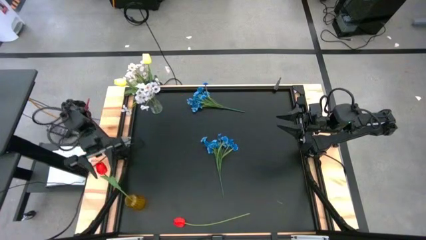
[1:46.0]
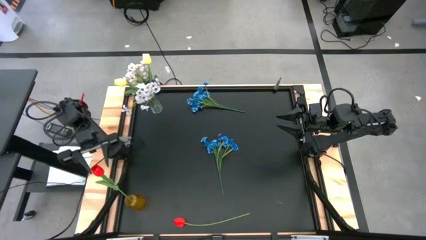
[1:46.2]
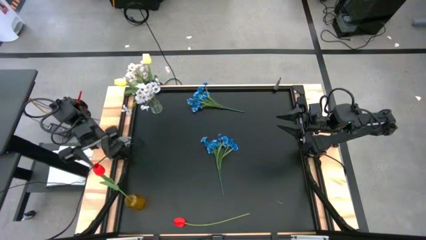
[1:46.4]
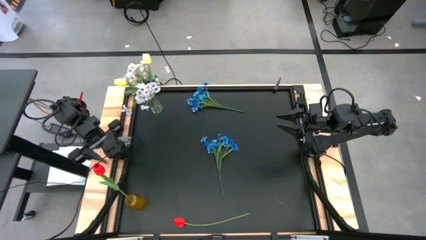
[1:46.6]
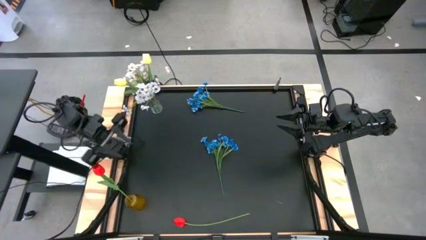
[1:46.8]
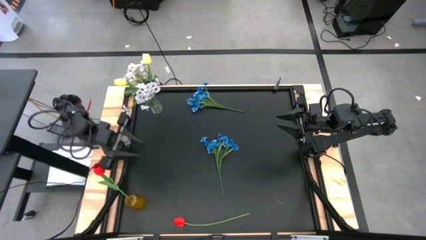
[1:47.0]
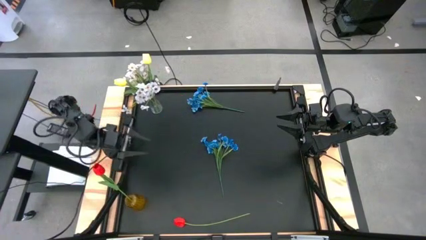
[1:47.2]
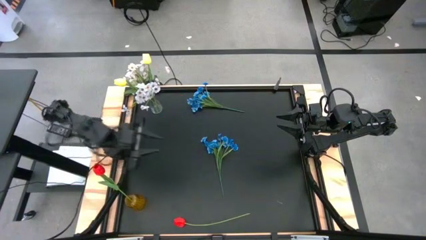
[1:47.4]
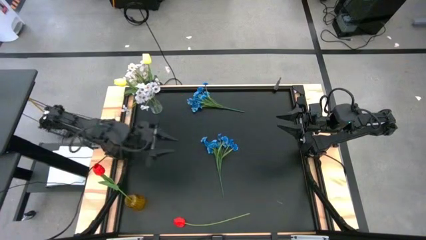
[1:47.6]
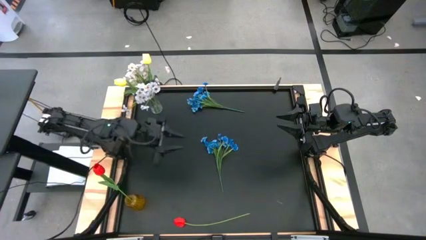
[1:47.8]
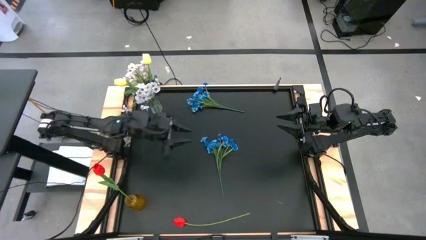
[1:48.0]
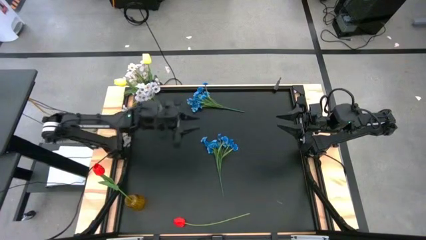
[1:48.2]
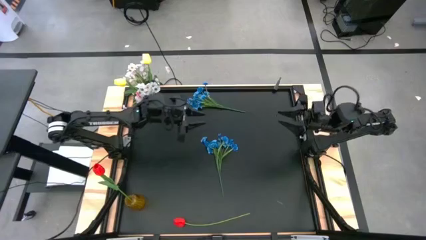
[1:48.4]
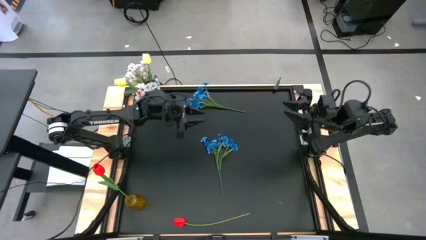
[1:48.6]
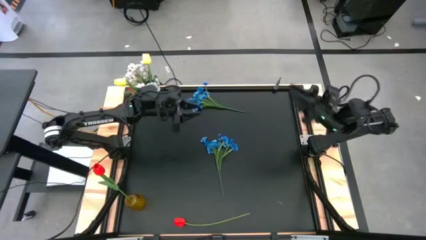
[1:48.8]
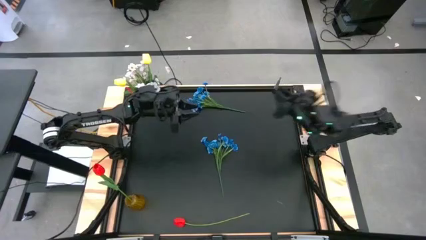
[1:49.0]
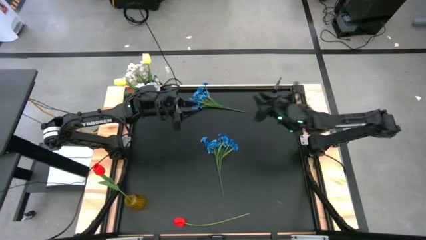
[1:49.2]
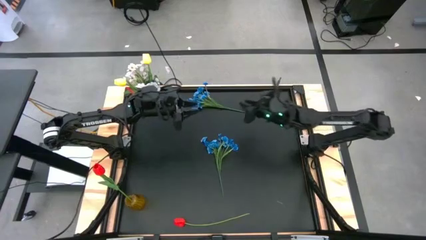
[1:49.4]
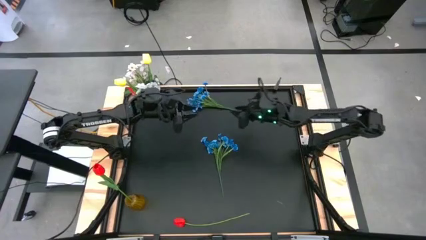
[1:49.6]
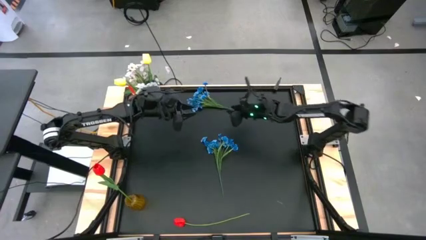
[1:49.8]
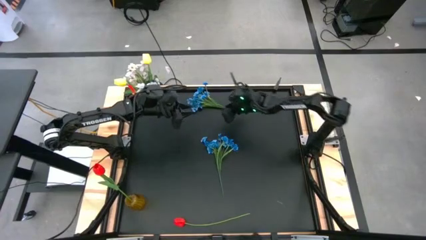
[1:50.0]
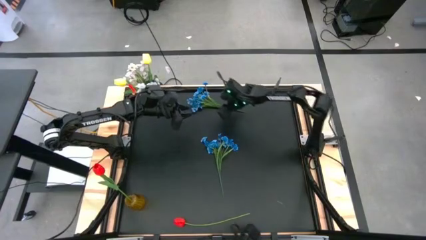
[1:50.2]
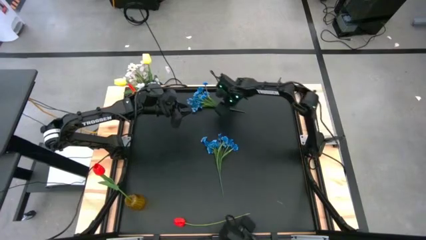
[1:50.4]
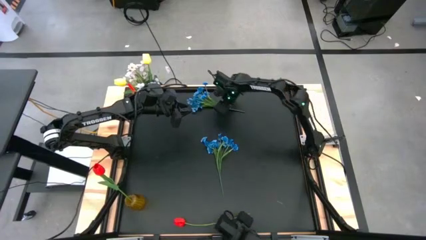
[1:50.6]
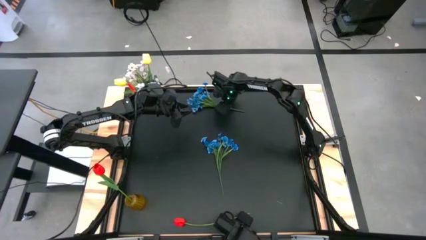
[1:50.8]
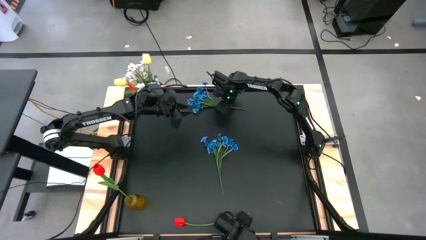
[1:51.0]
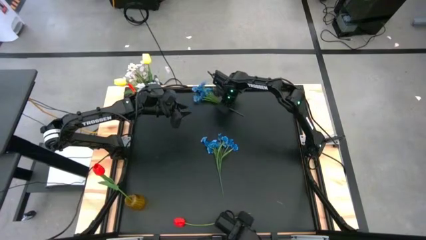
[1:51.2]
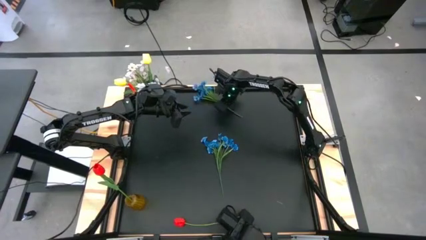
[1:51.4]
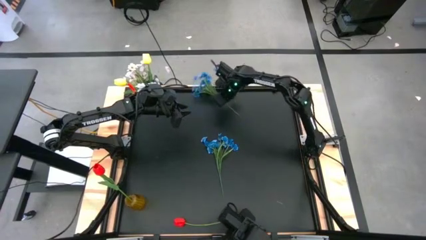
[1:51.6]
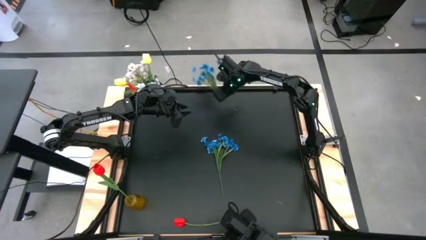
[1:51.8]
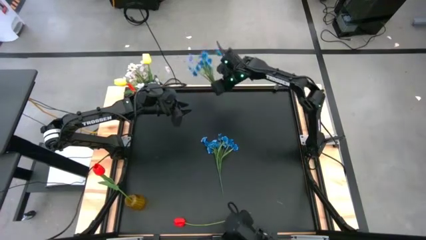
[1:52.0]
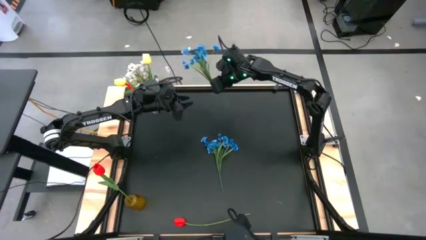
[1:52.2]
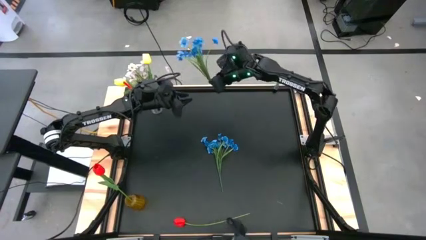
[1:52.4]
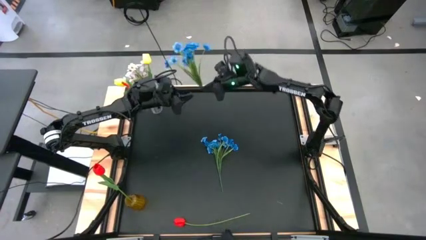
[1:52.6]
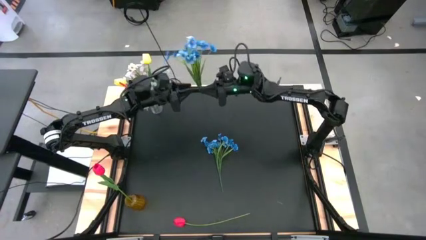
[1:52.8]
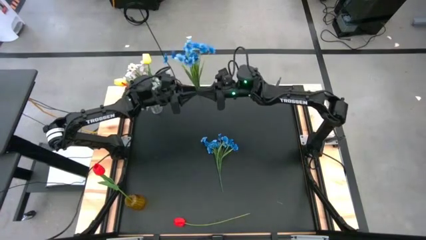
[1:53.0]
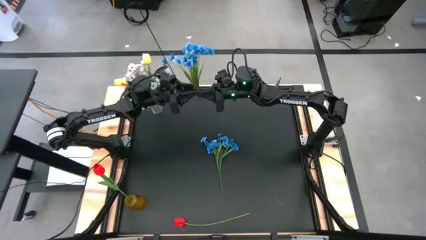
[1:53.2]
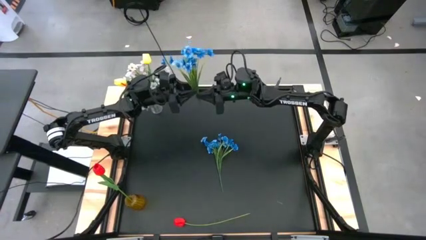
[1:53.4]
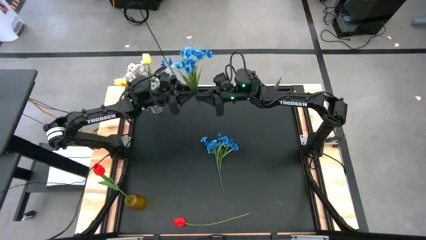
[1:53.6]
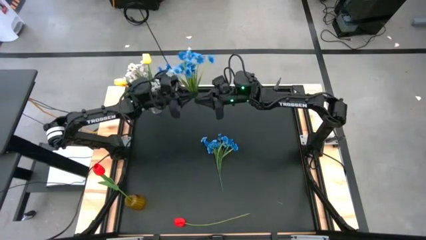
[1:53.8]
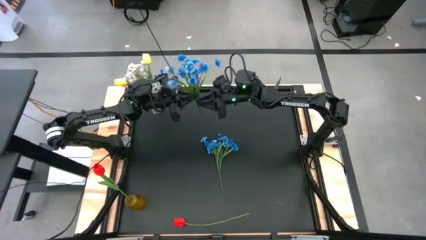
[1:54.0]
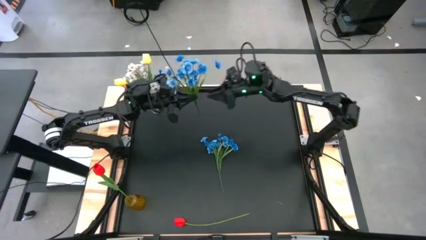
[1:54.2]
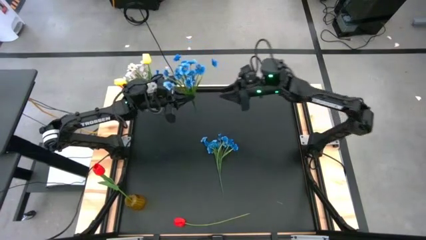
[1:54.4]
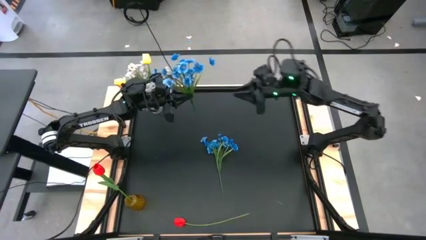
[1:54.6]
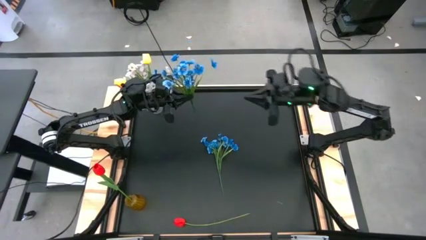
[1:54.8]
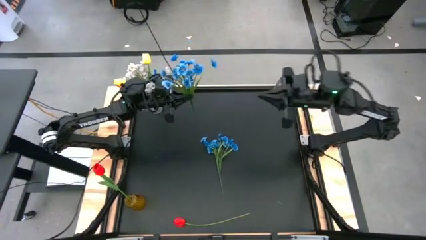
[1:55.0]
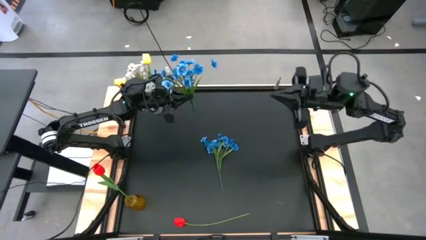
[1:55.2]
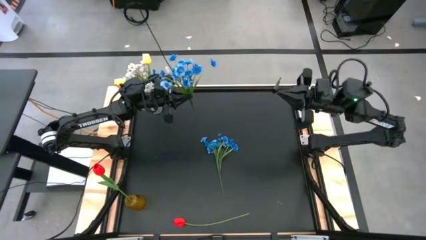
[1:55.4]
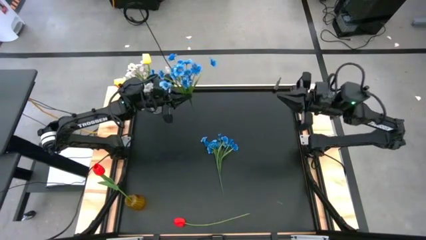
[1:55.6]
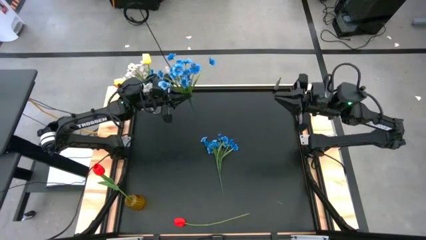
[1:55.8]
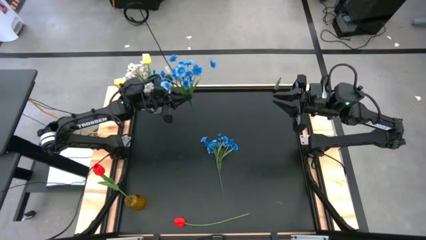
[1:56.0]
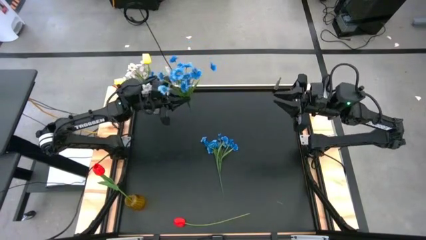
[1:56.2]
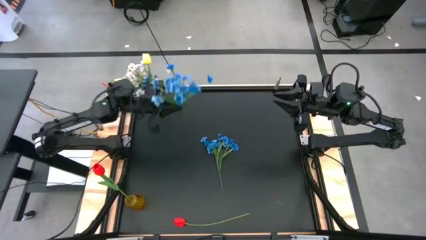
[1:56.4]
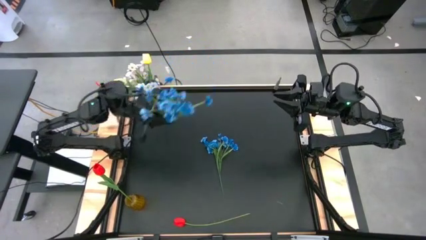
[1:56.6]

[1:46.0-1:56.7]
Task: Sort flowers into vase by color
Put the top blue flowers into the yellow vase

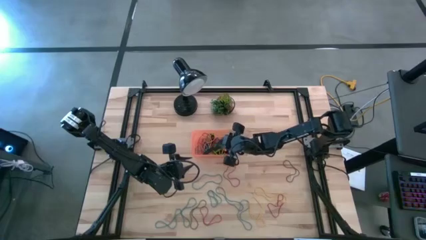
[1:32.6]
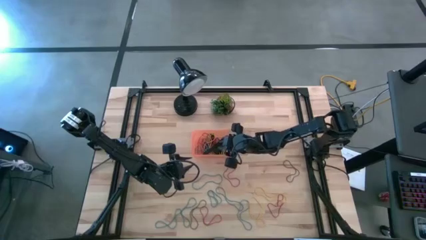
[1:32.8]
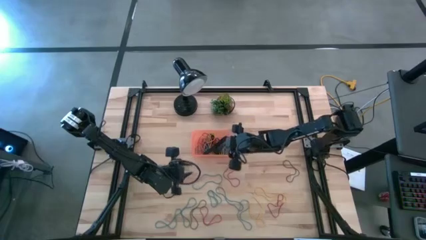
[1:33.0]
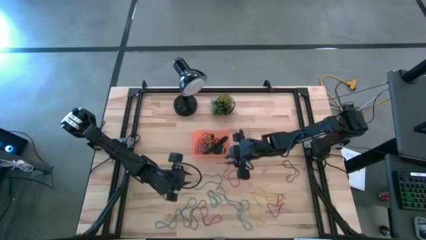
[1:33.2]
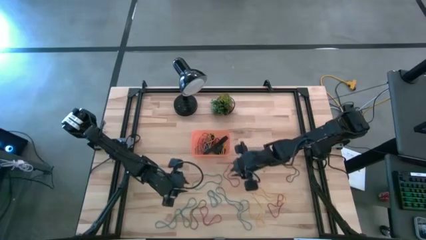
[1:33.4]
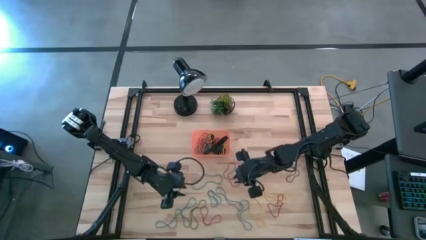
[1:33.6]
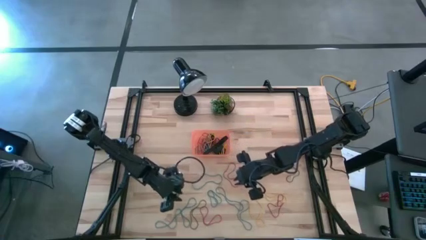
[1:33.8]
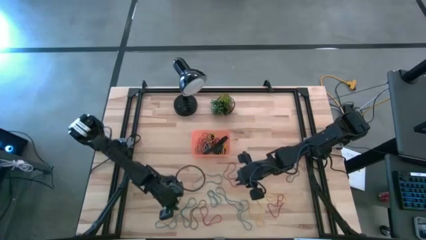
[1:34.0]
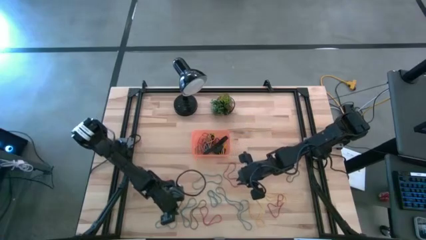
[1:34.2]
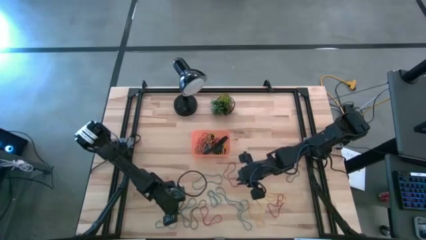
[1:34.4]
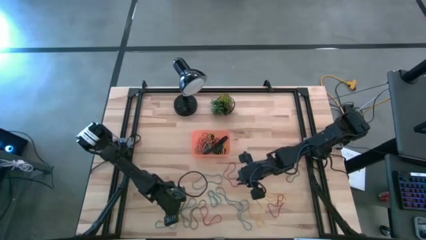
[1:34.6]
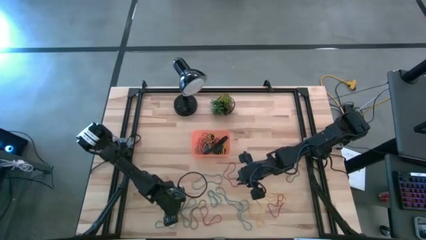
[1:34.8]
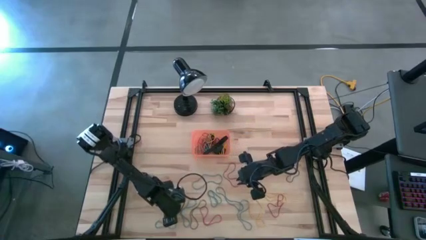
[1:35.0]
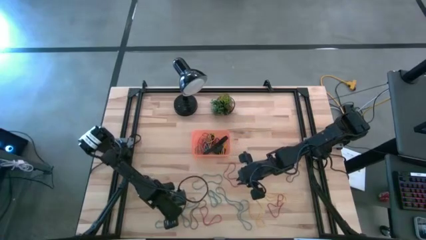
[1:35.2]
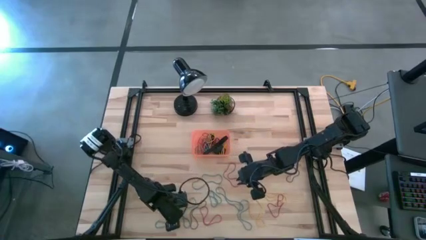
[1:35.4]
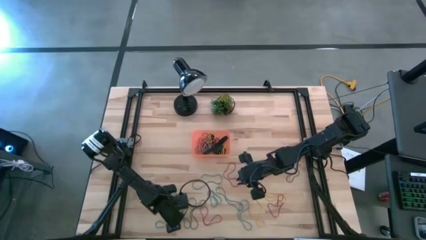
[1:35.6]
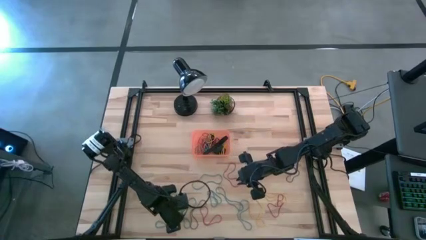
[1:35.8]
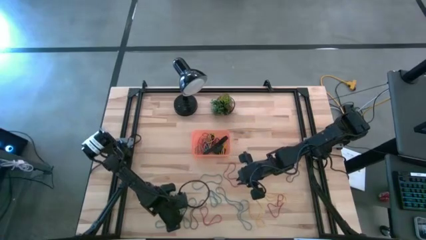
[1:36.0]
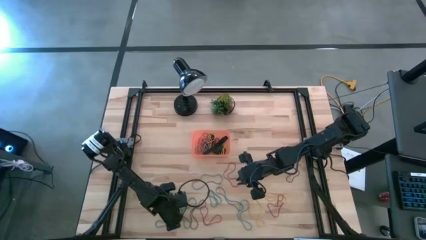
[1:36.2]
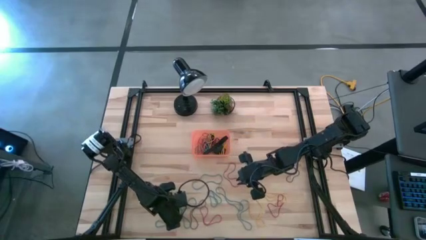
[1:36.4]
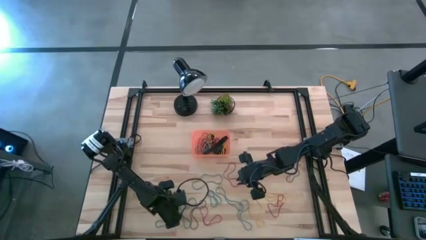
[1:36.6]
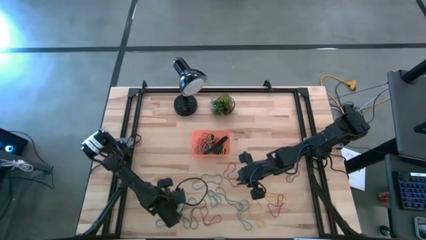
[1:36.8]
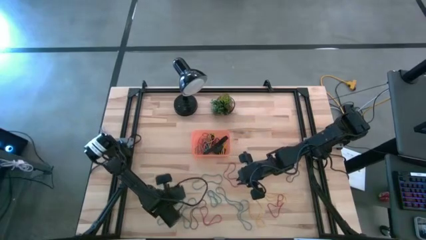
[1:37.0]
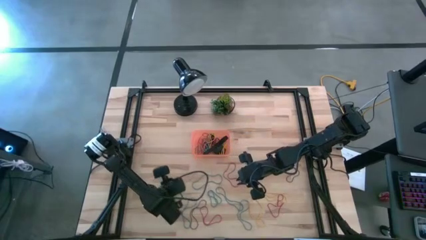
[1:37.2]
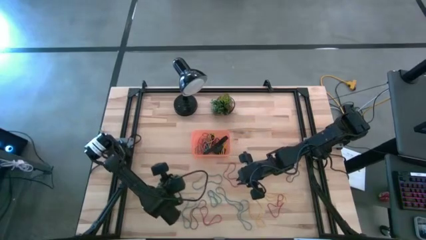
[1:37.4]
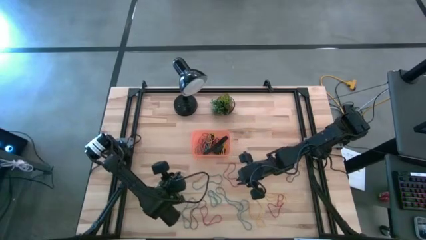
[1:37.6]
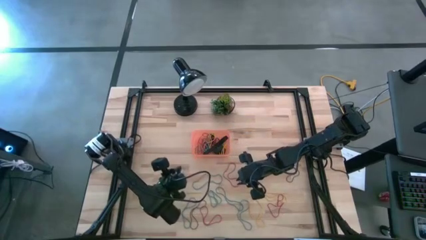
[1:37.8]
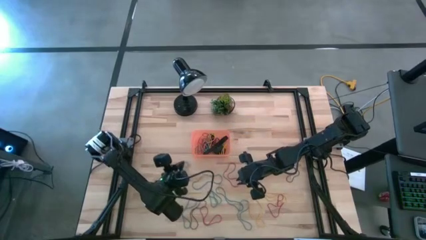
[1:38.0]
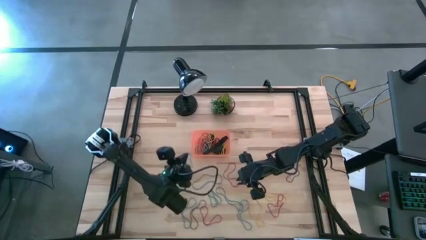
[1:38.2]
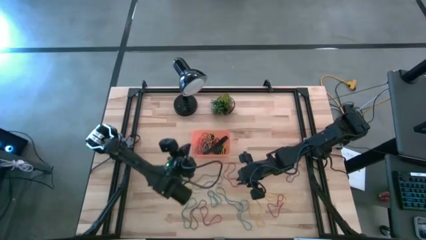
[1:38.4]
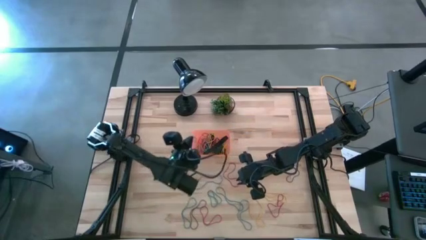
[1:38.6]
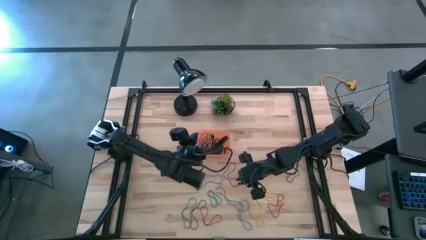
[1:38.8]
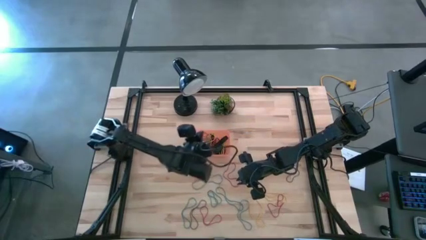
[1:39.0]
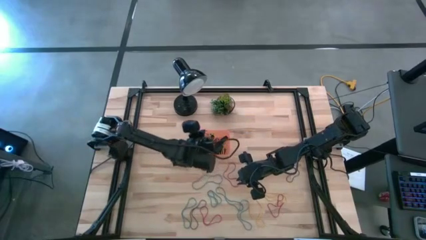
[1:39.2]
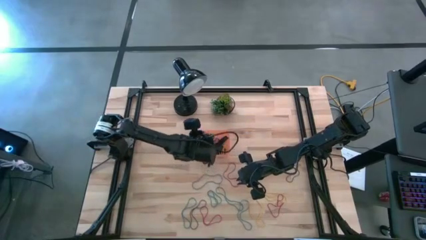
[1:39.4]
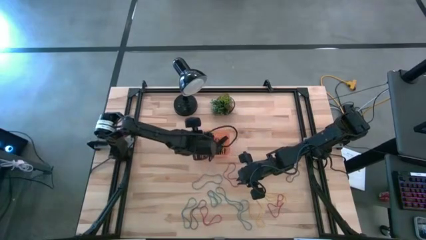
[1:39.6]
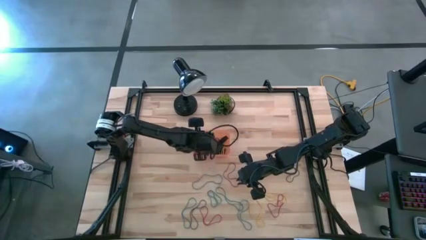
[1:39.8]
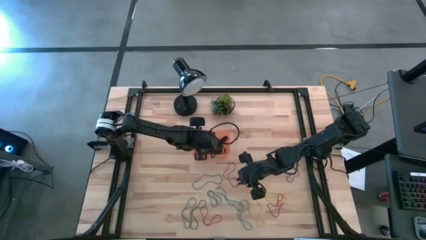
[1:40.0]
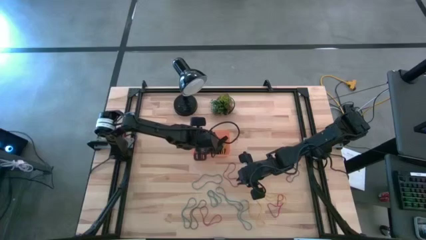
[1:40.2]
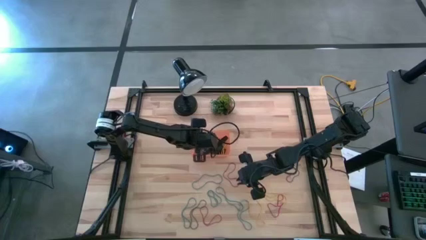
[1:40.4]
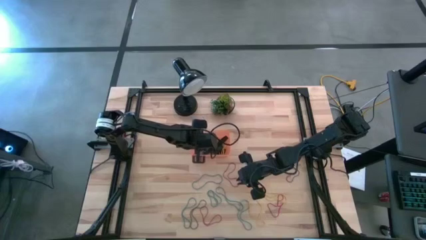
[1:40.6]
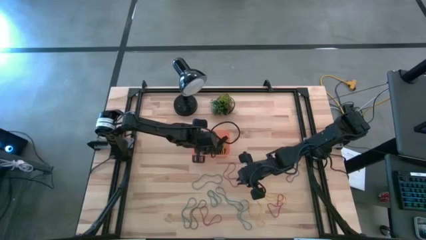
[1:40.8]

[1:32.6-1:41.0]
Task: Pick and place rubber bands into bin
Put the blue rubberband into the orange bin
